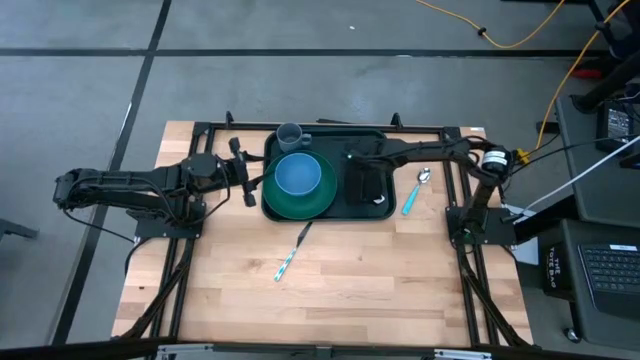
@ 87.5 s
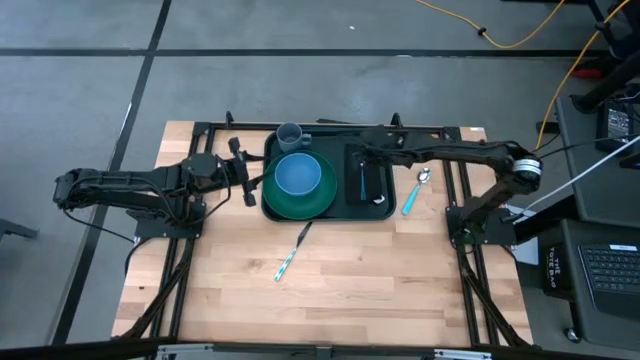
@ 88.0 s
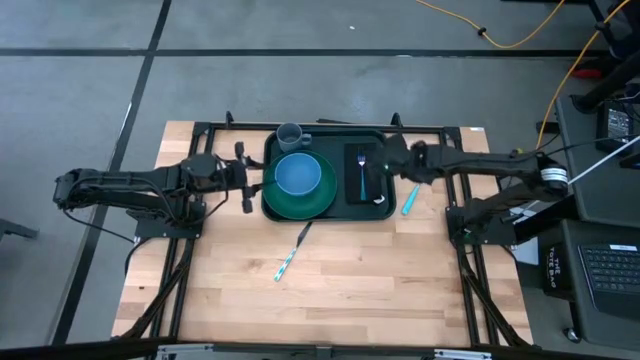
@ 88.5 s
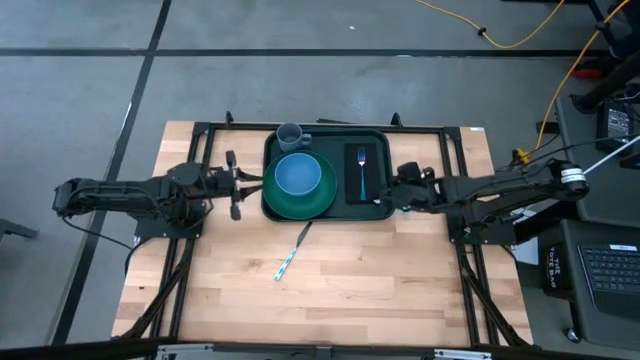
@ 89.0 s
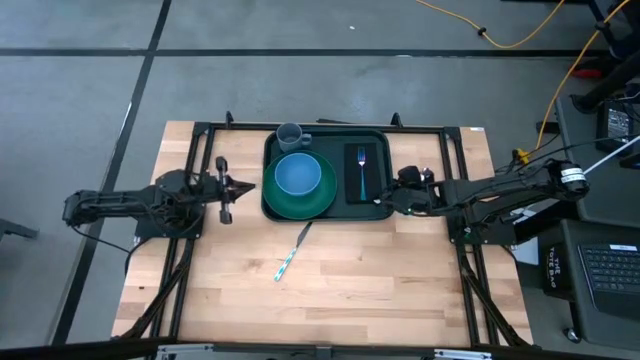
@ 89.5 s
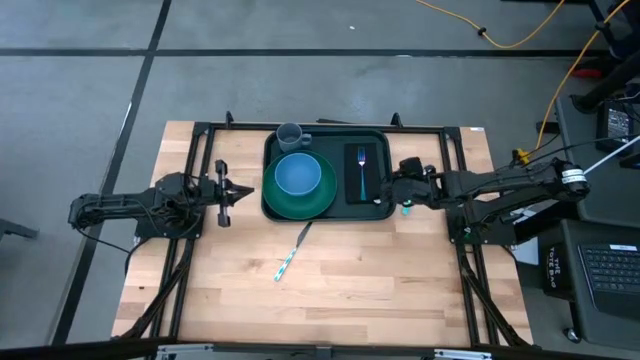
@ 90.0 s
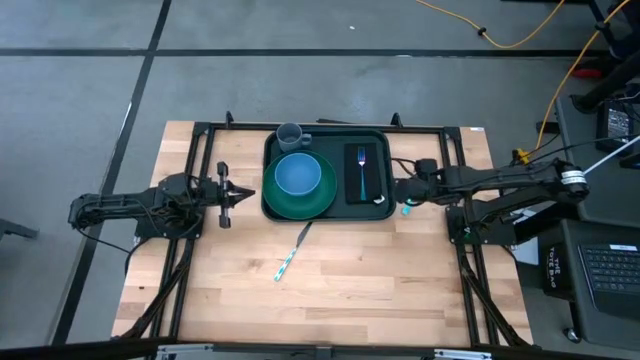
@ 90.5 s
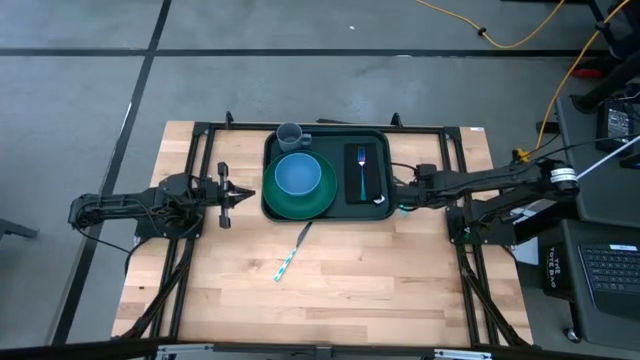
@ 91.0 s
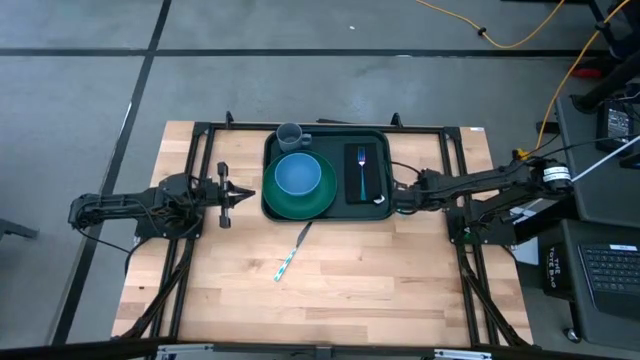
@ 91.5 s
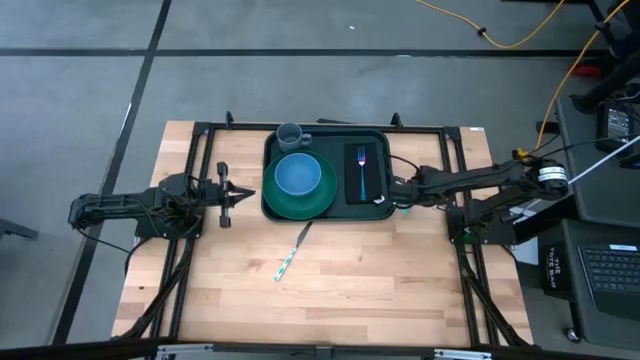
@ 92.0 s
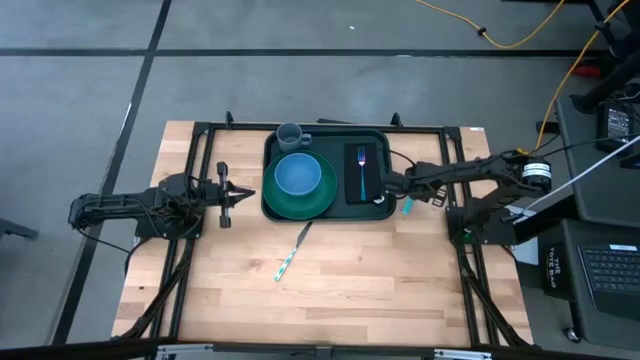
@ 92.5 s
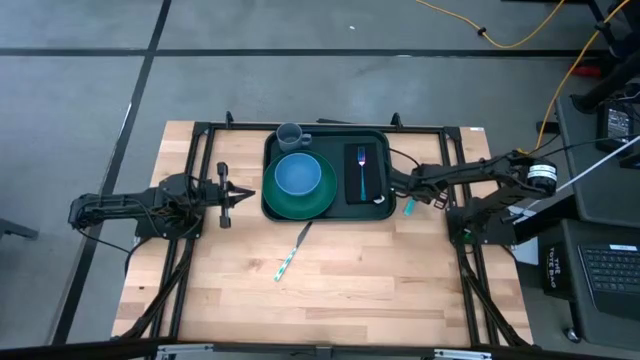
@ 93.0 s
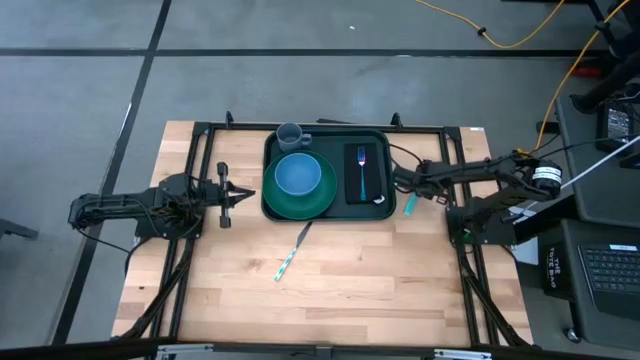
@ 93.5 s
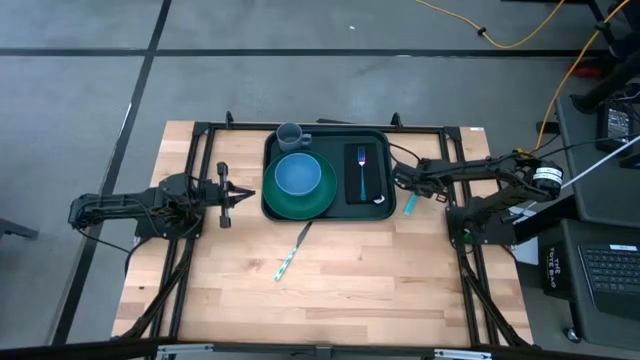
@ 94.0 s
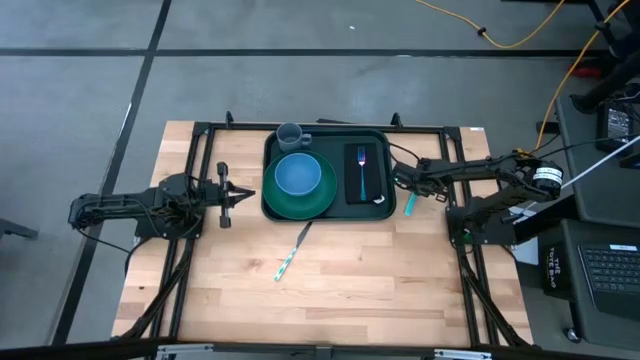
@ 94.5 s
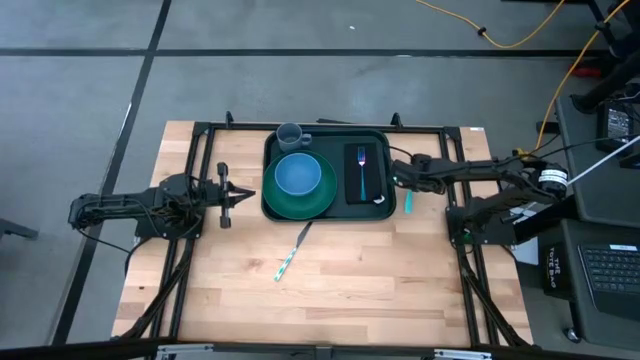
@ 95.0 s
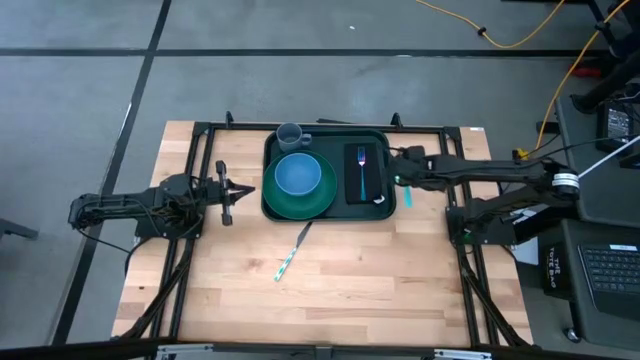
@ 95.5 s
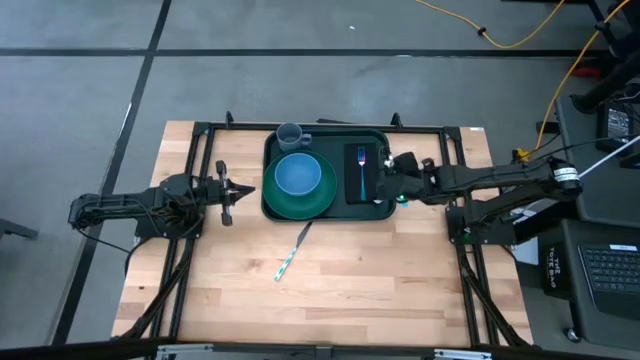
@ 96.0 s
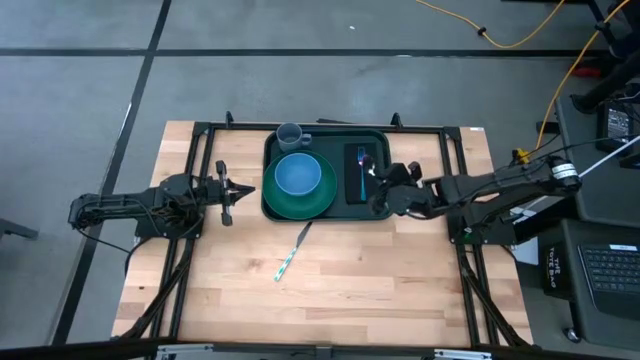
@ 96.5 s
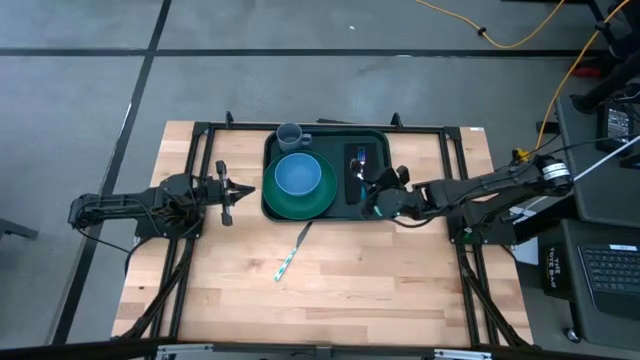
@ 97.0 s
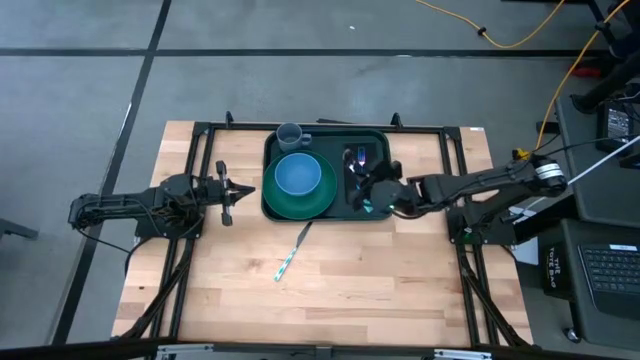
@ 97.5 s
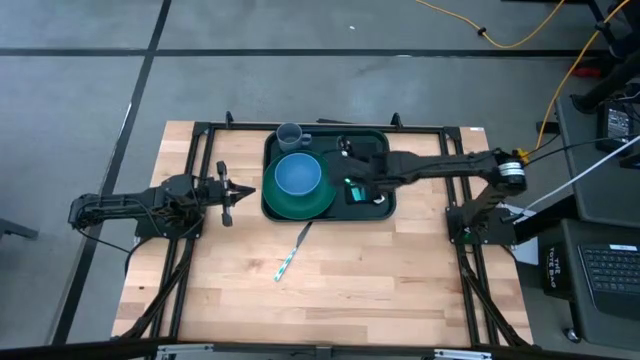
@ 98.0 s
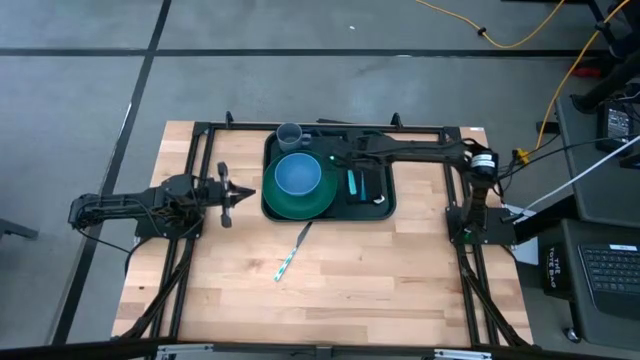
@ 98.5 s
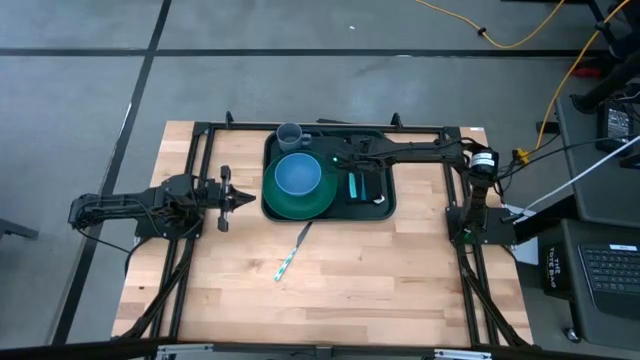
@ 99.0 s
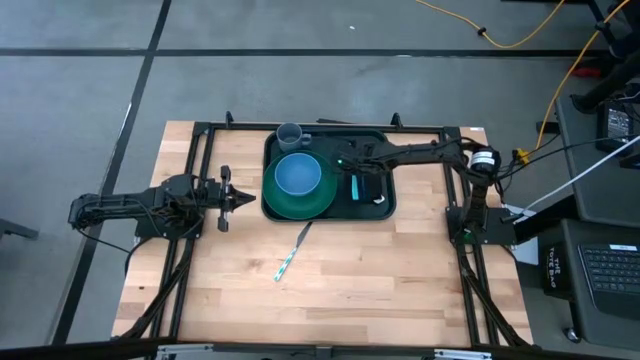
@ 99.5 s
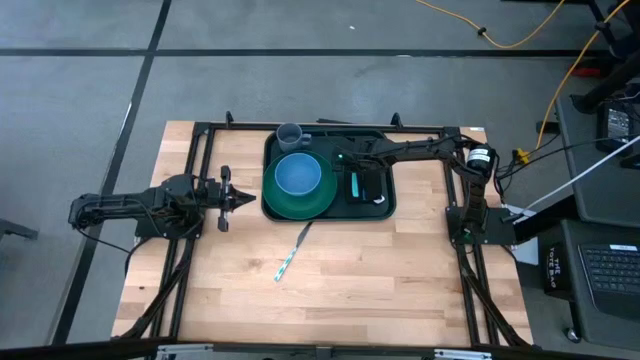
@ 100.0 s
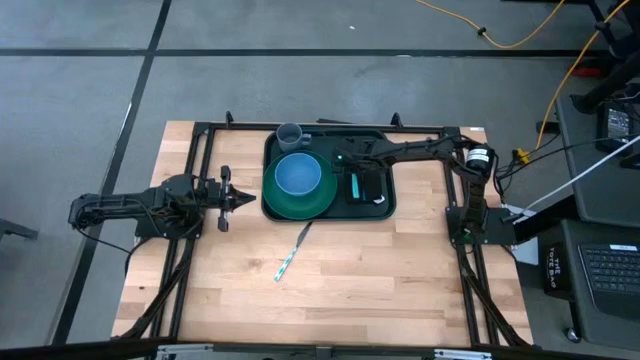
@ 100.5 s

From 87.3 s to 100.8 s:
Task: Set up tray
Put the spoon on the napkin to the left of the fork

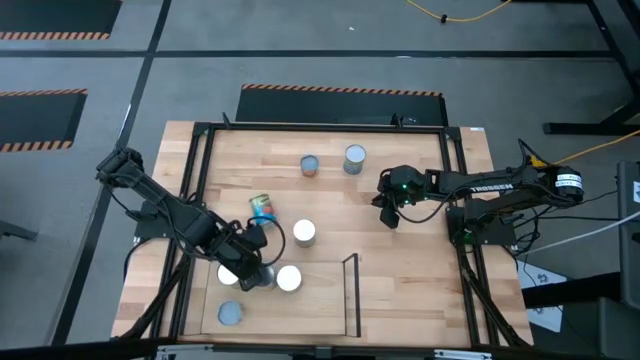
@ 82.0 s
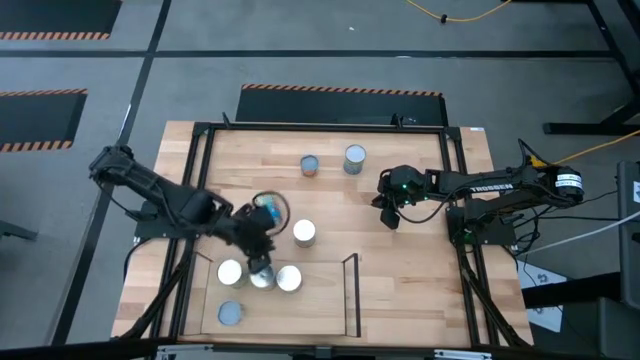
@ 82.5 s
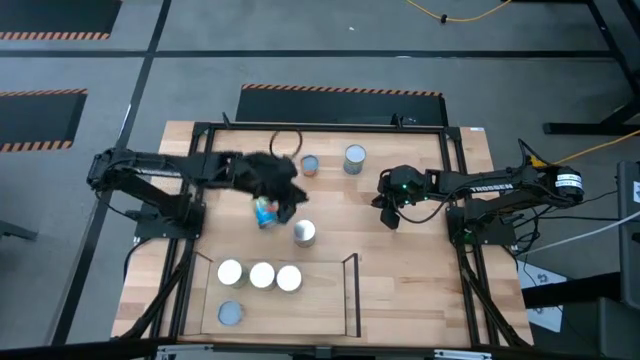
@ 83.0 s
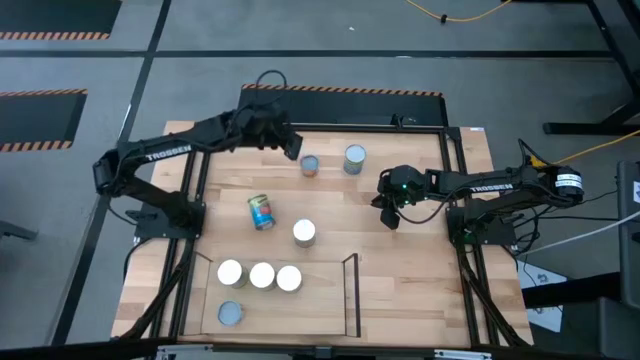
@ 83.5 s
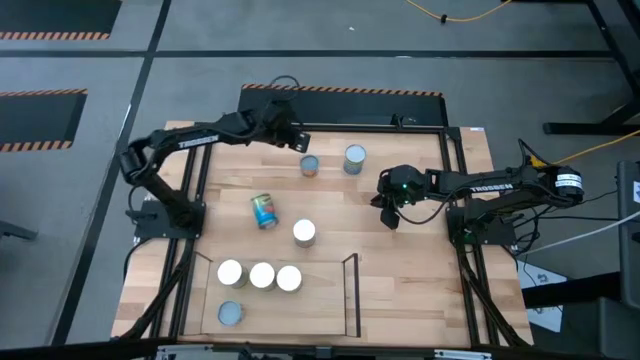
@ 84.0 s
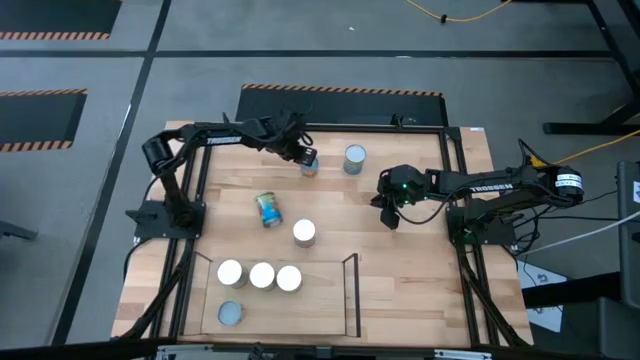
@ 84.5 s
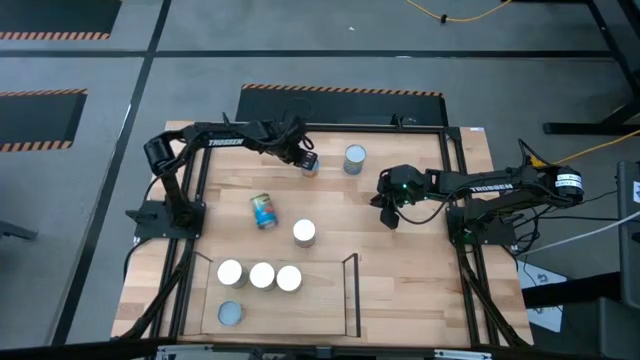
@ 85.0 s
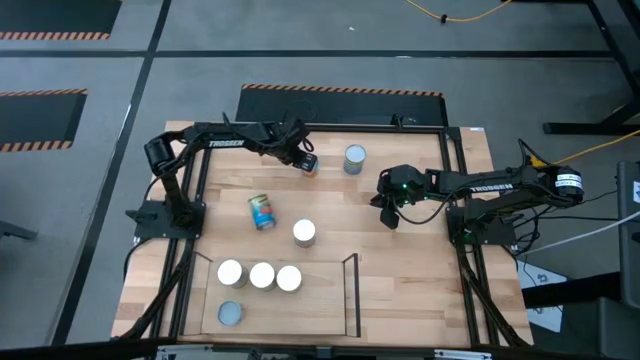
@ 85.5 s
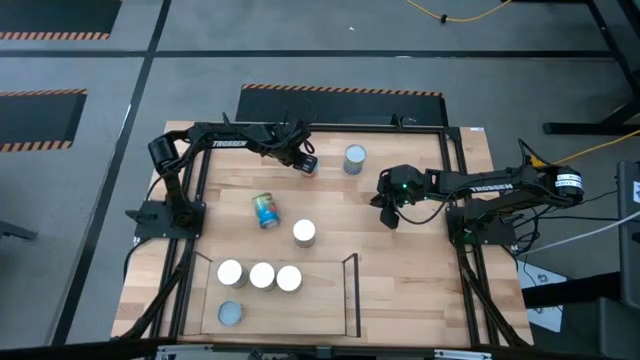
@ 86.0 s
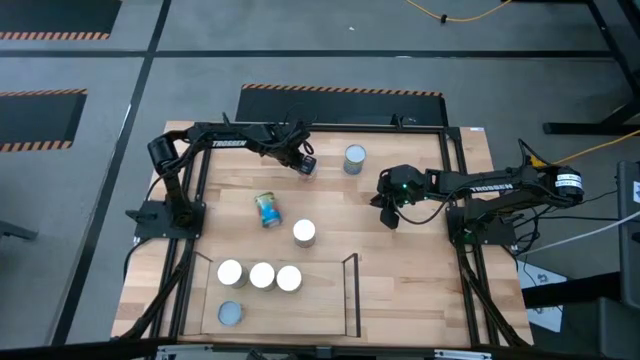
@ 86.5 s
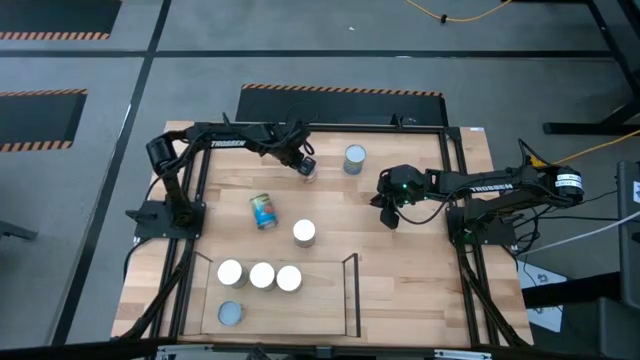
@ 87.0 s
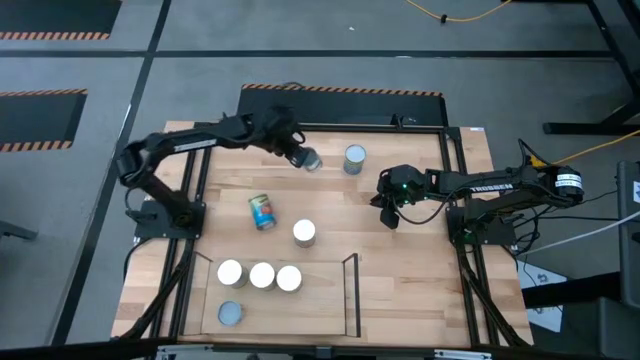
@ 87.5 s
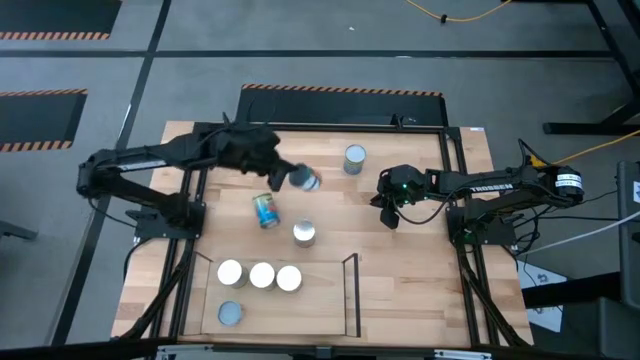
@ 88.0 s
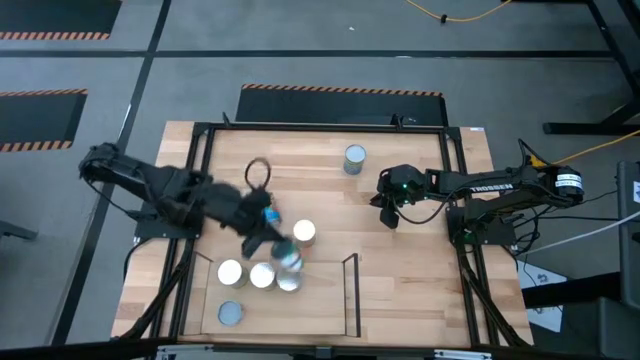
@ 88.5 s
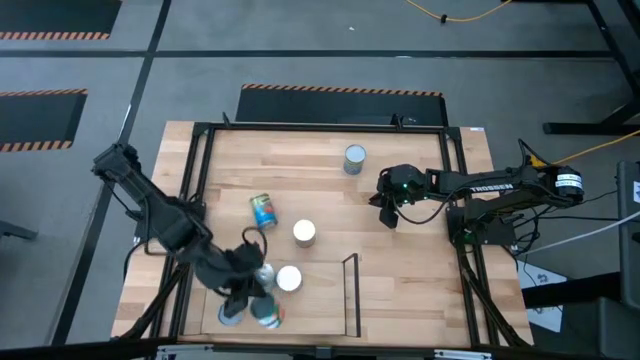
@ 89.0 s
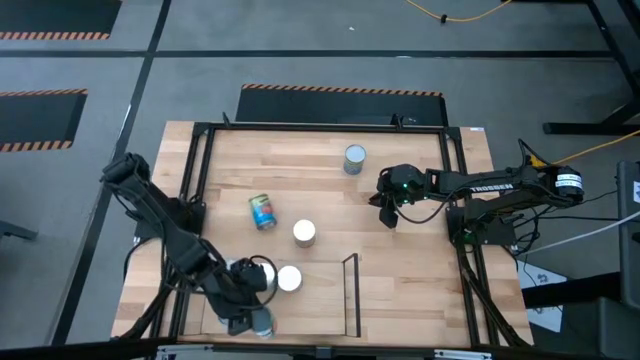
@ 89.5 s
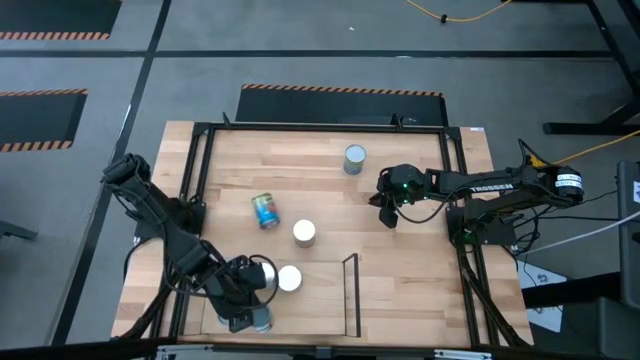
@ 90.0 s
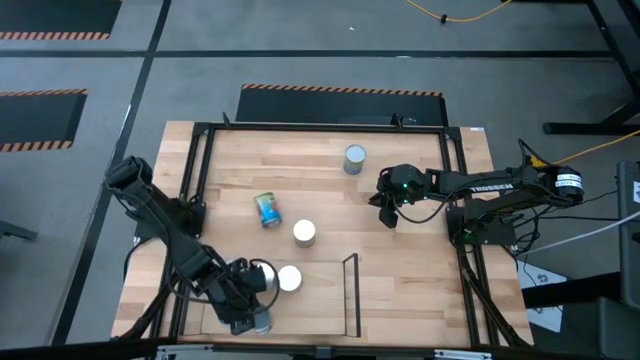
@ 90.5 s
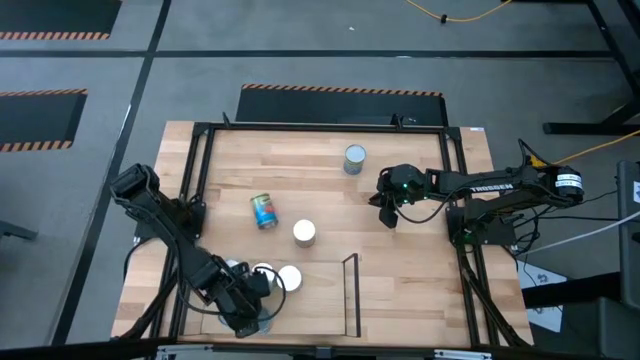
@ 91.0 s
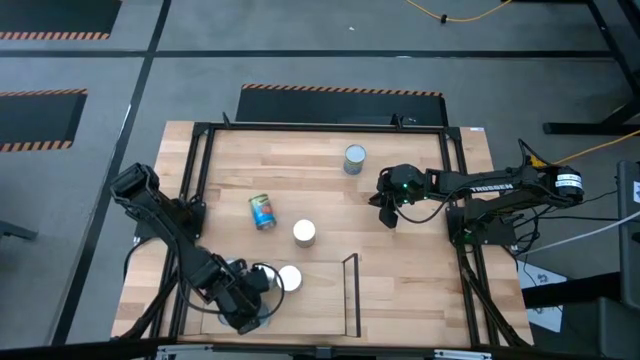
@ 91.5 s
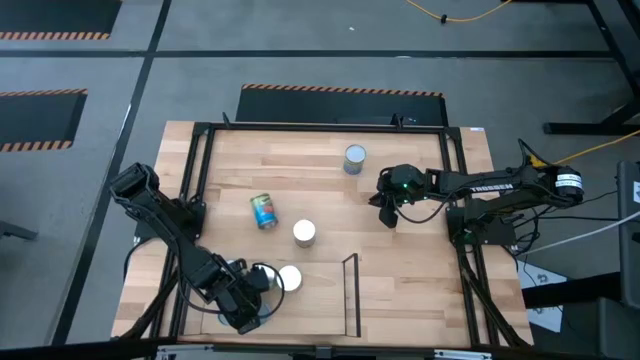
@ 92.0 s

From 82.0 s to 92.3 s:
Task: Pick and place cans onto a shelf
Put the small canned orange on the shelf
